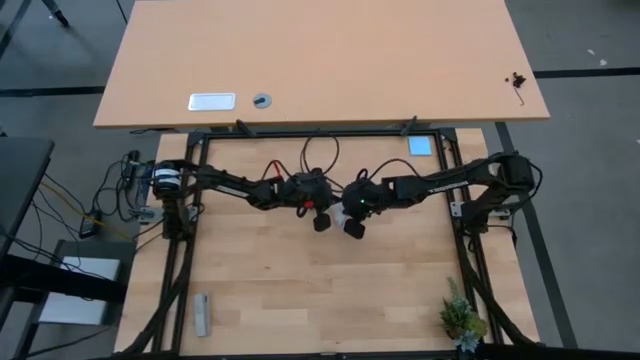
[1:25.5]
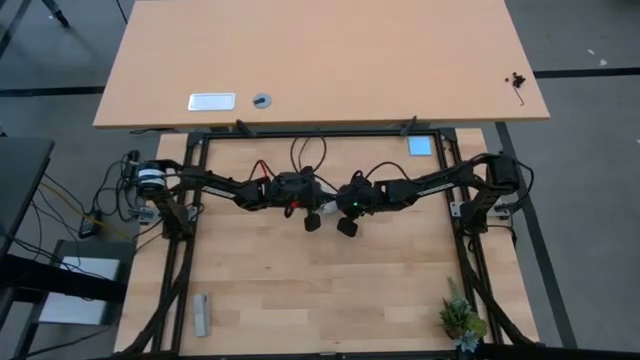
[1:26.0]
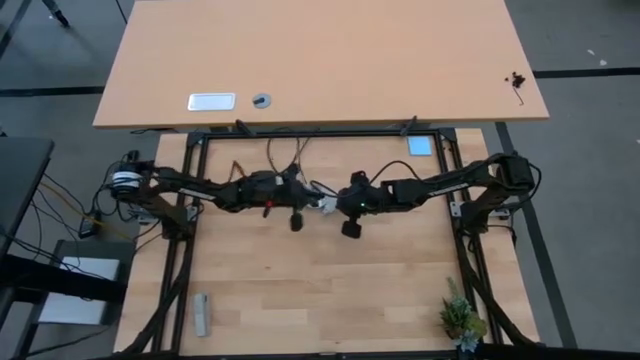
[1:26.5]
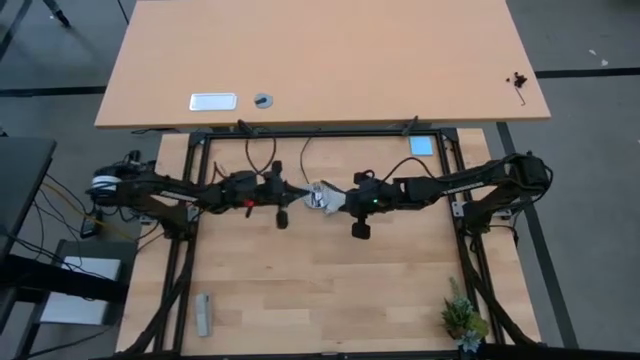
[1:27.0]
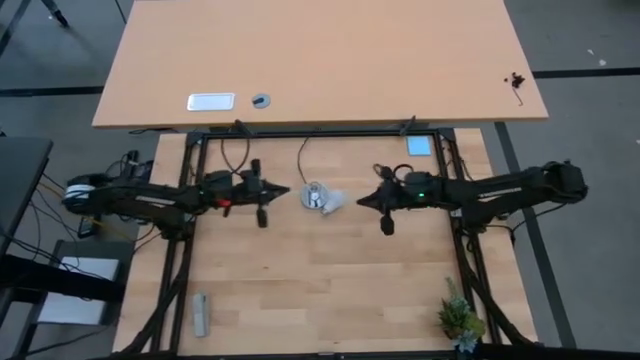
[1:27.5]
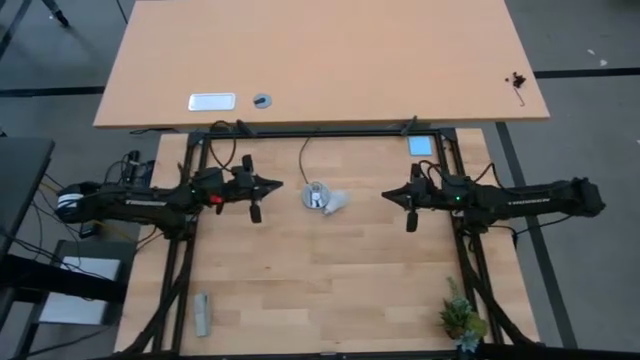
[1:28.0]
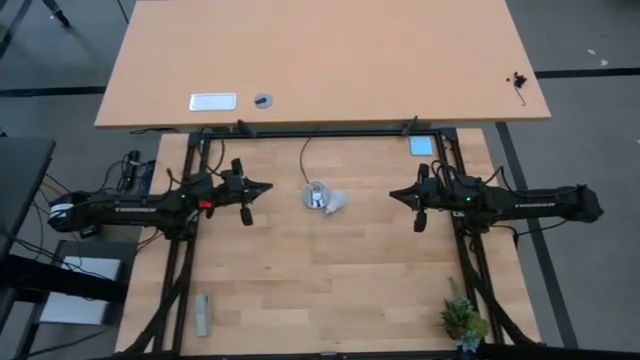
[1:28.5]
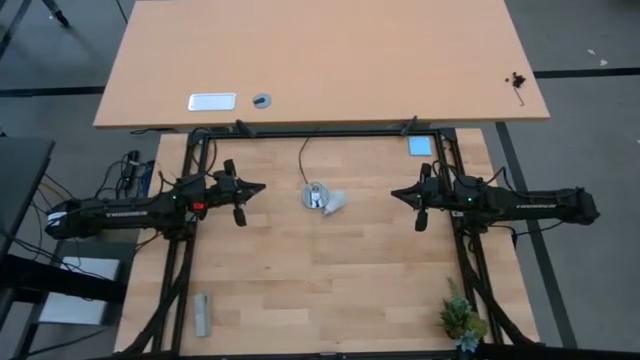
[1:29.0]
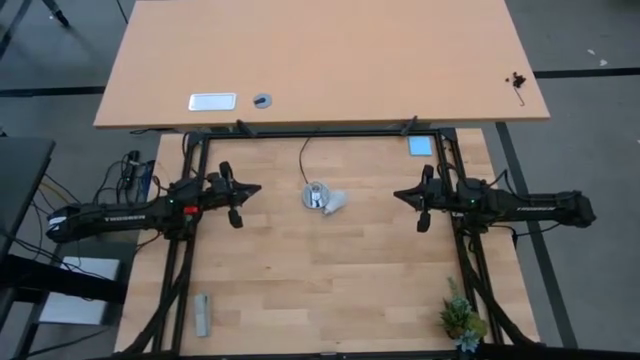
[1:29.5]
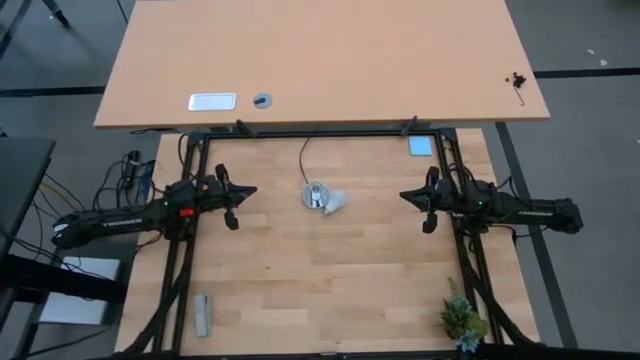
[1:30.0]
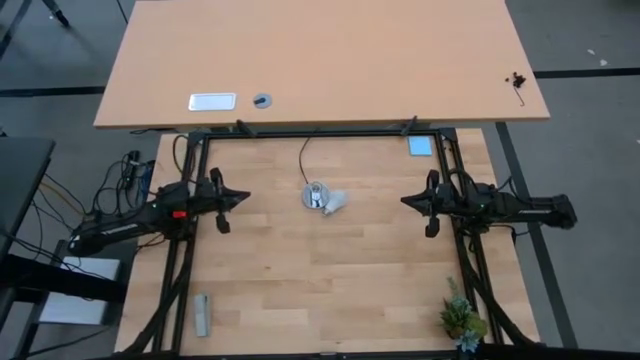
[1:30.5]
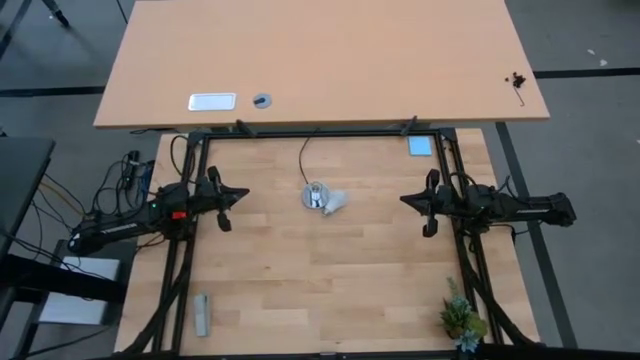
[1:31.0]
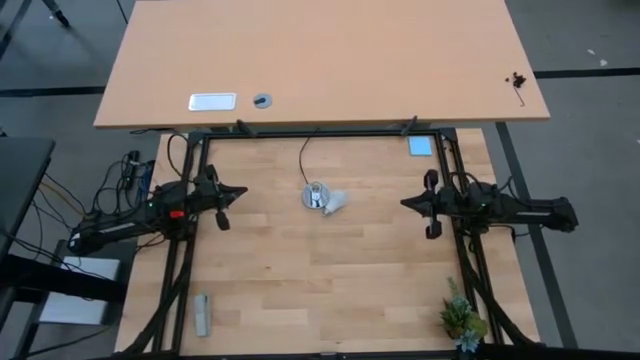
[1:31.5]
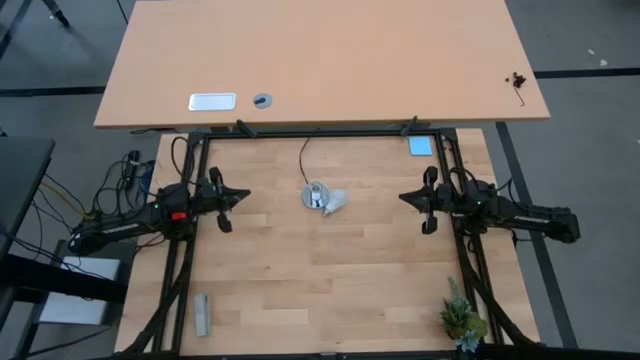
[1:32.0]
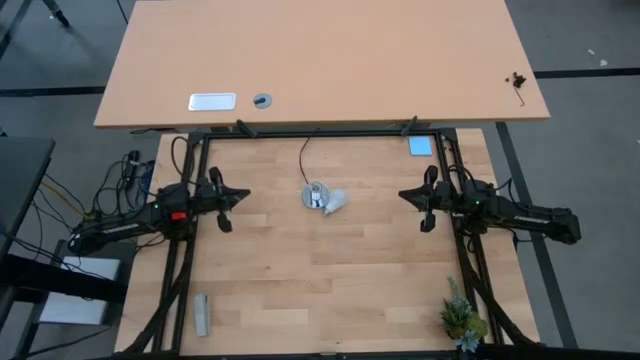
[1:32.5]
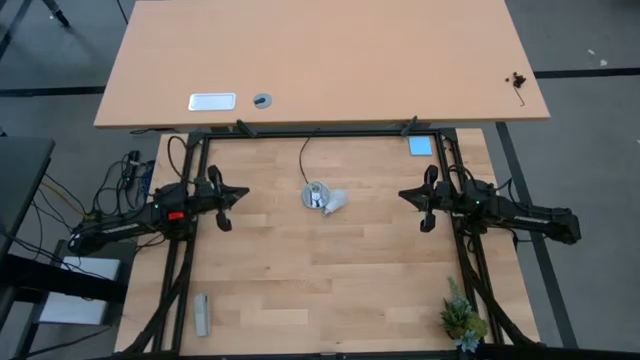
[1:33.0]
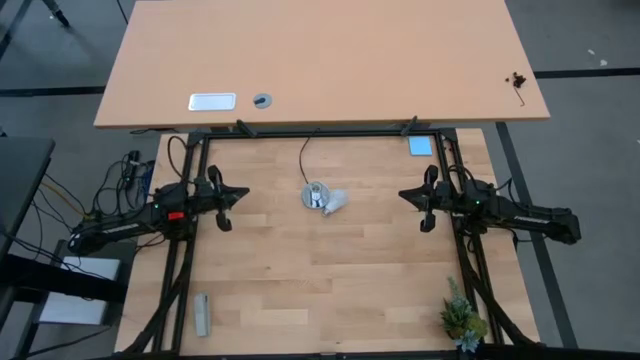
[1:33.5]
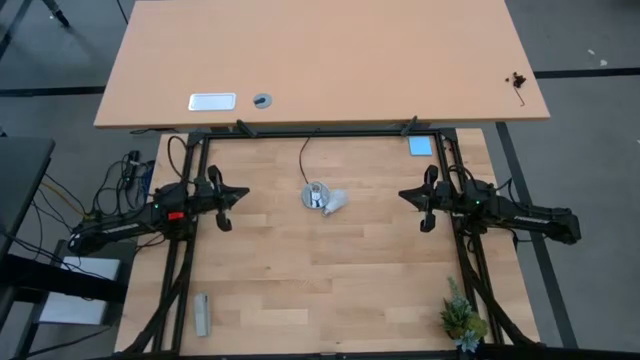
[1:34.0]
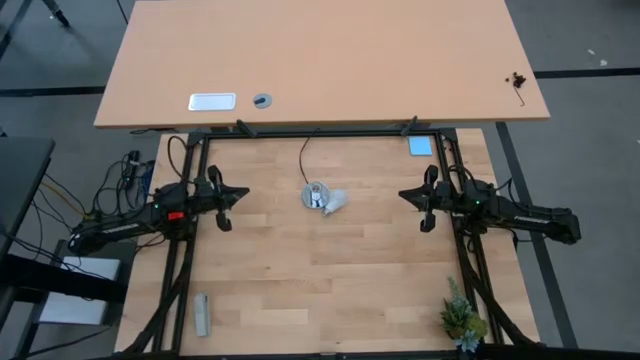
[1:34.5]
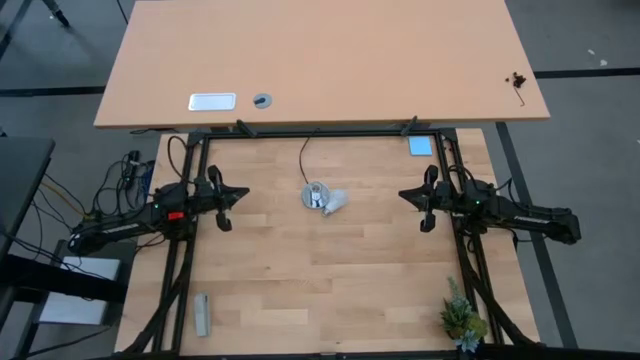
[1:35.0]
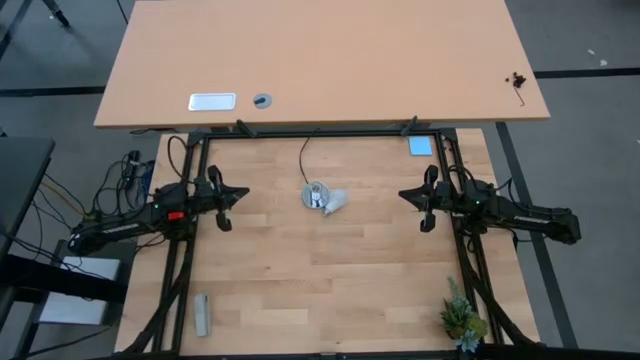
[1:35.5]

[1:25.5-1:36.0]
Task: Screw lightbulb
Return to Home Position

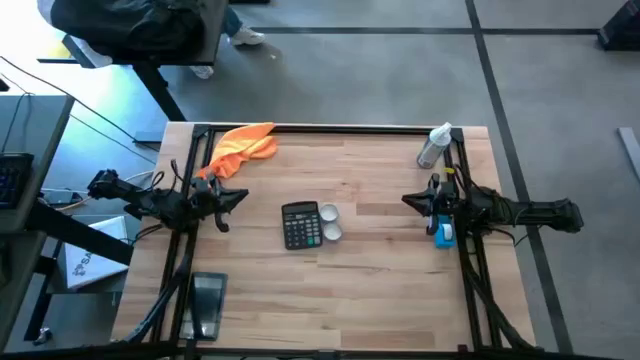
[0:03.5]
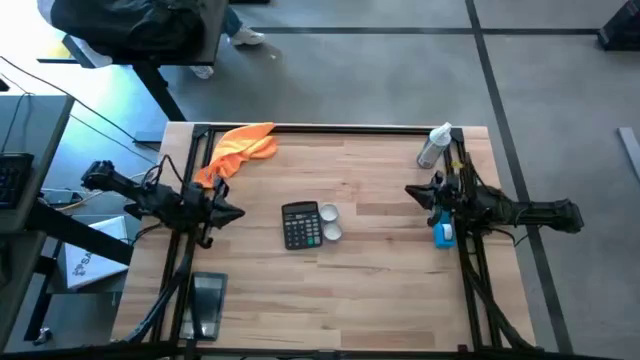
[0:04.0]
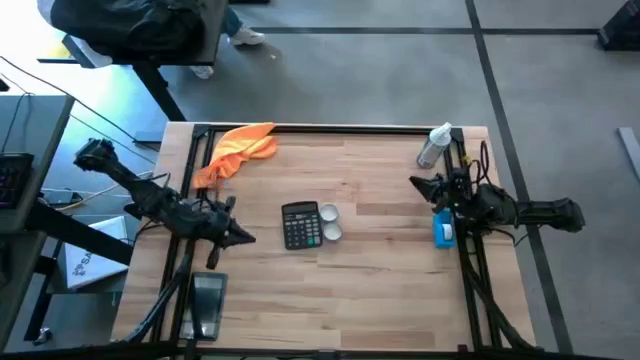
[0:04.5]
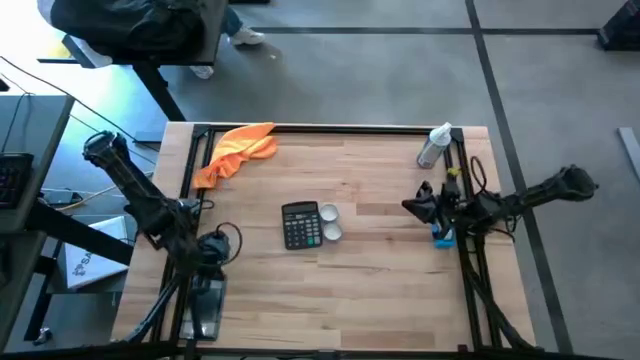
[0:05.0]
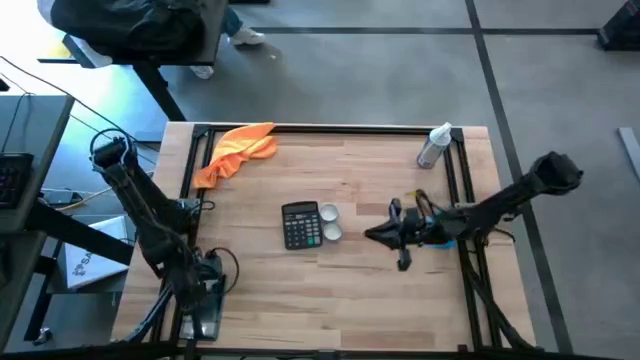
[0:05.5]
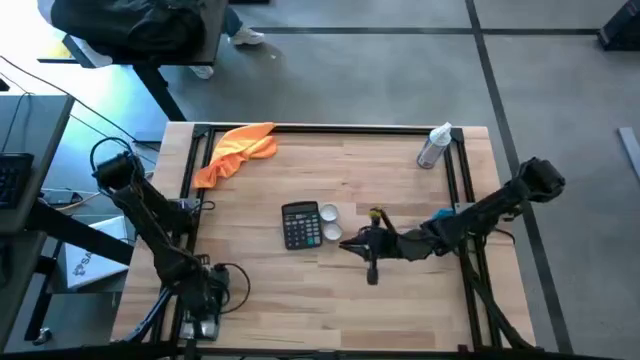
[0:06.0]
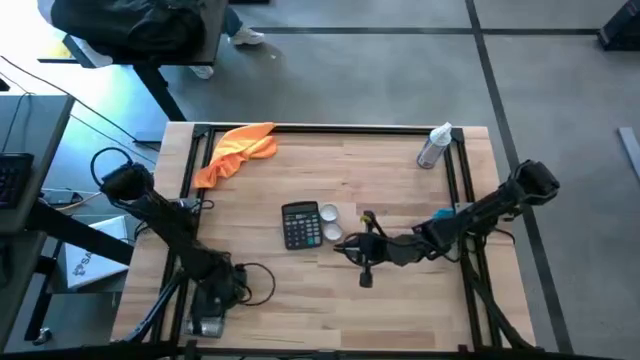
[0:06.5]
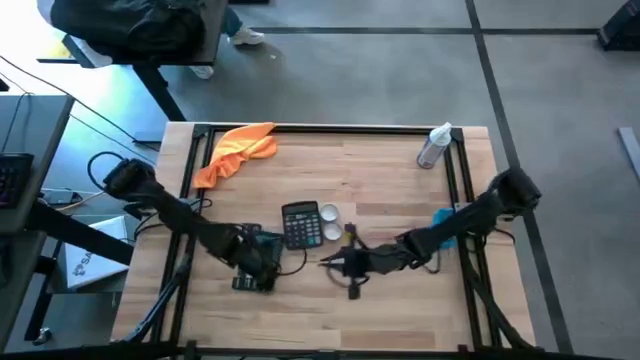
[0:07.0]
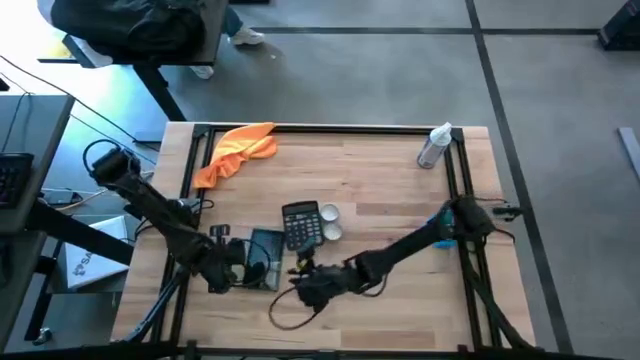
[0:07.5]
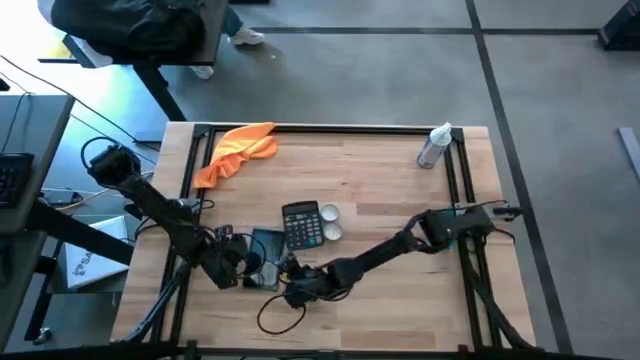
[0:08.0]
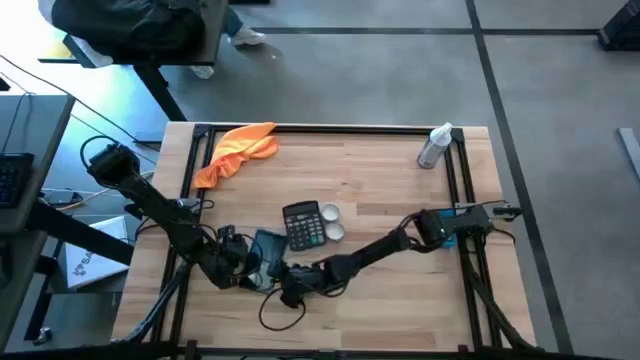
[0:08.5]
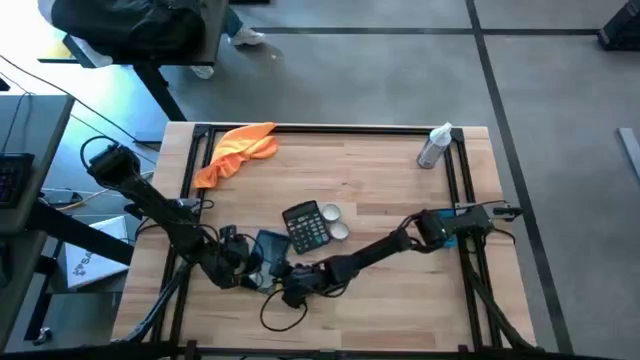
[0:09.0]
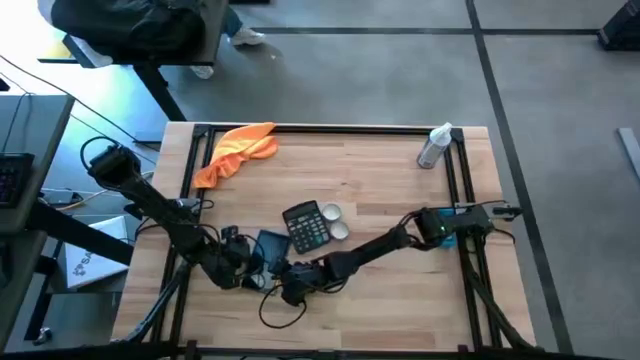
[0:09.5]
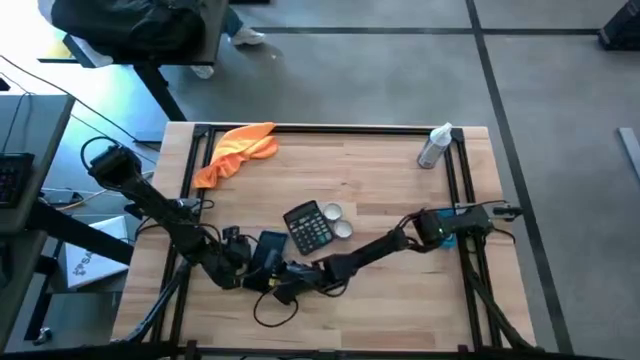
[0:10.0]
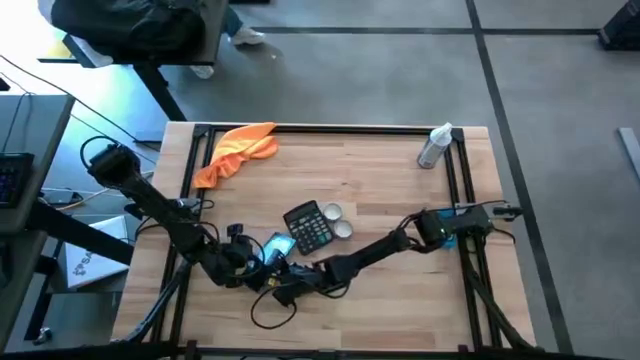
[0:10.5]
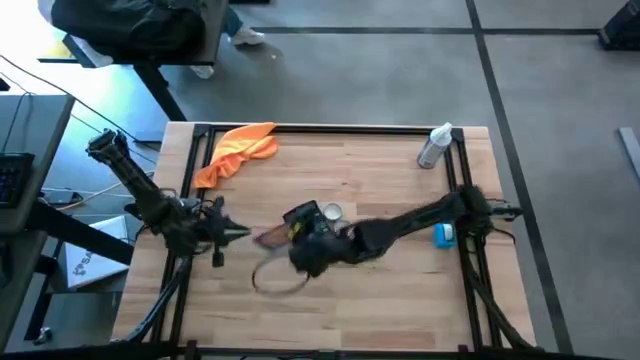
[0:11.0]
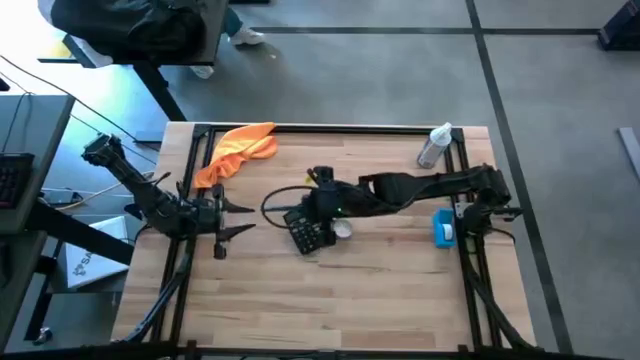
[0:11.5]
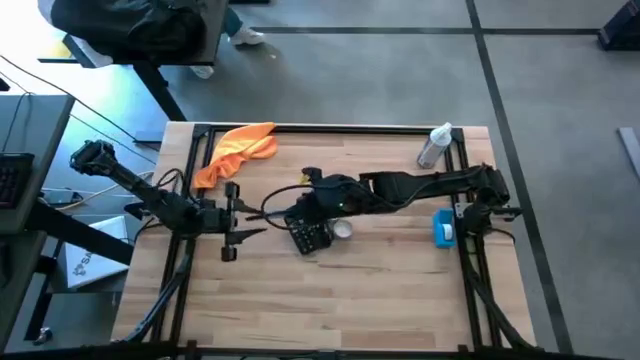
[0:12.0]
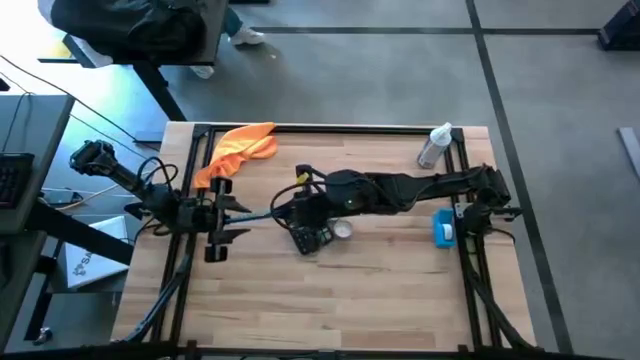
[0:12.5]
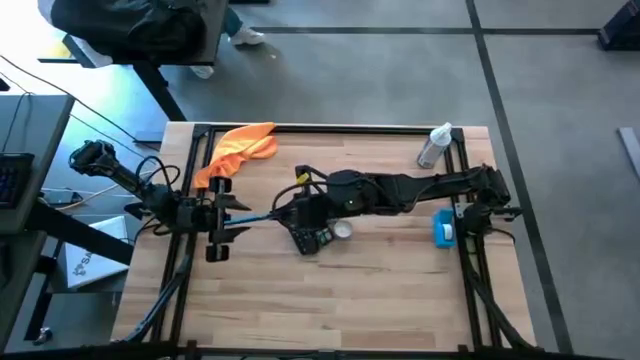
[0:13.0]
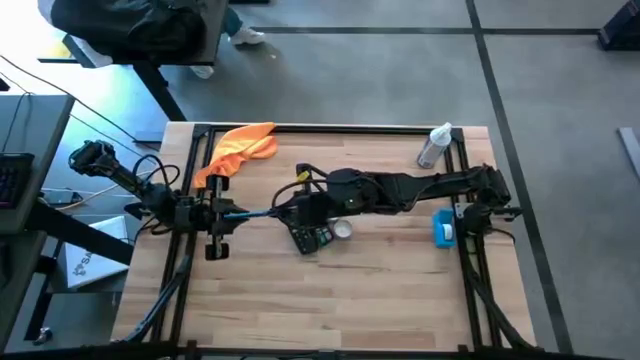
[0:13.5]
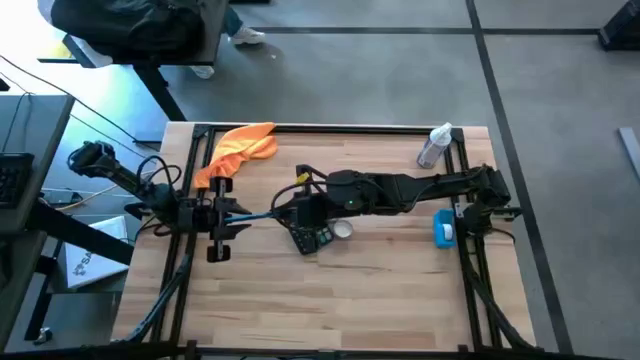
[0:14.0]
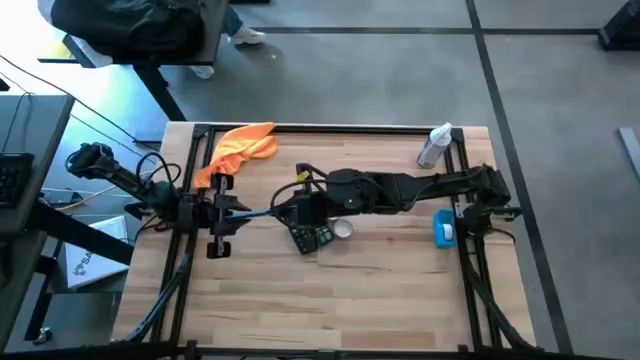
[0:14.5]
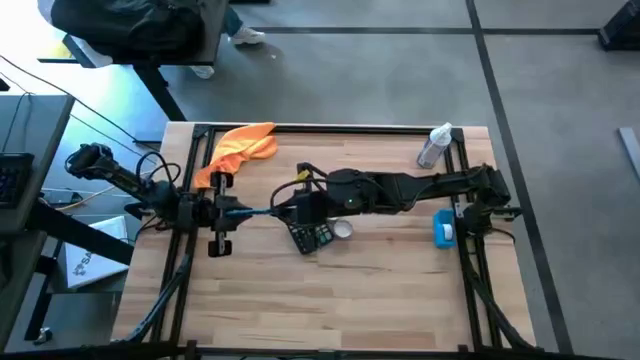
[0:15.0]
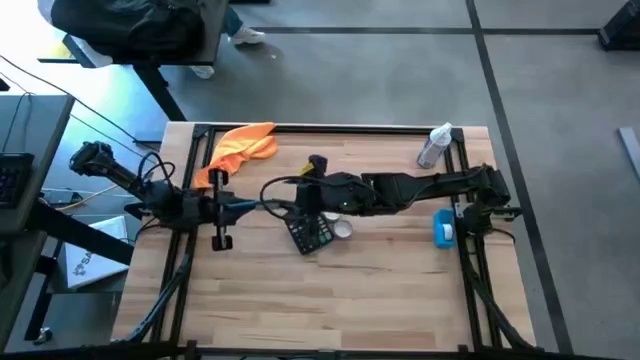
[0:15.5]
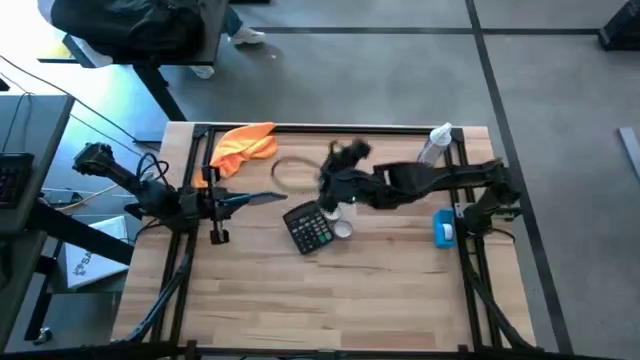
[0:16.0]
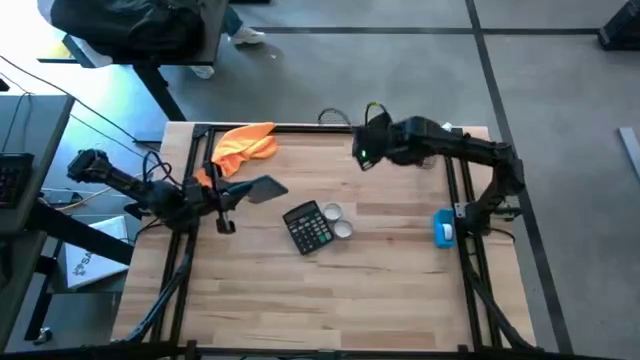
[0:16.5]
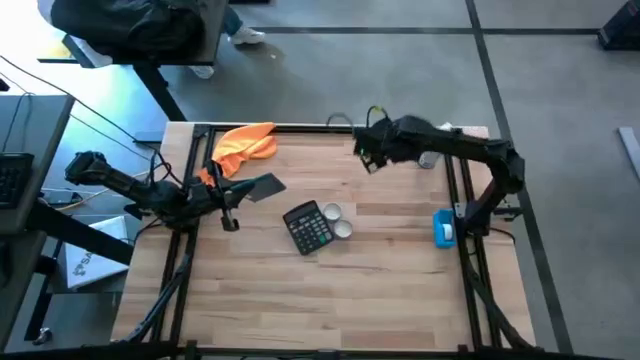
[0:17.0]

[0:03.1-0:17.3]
Task: Apply microfiber cloth
Spray the back of the black tablet using the white spray bottle
